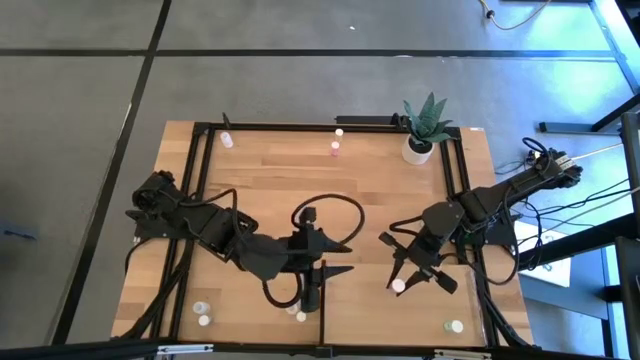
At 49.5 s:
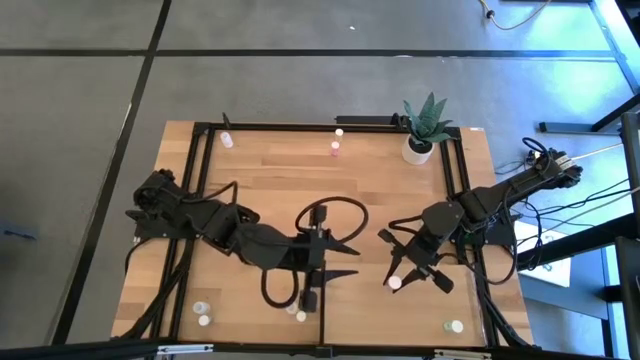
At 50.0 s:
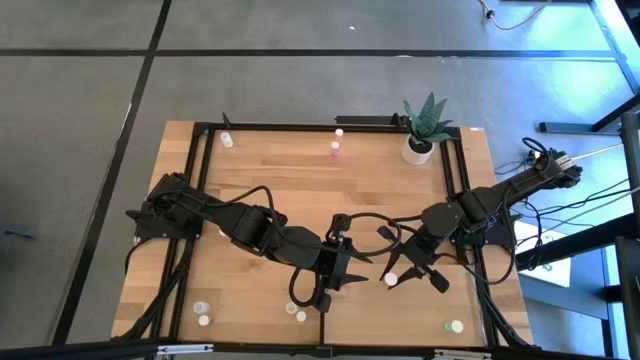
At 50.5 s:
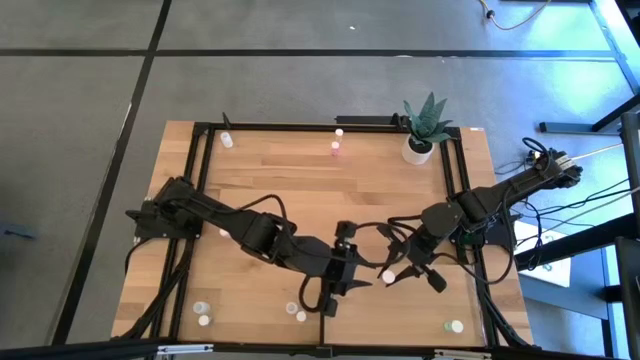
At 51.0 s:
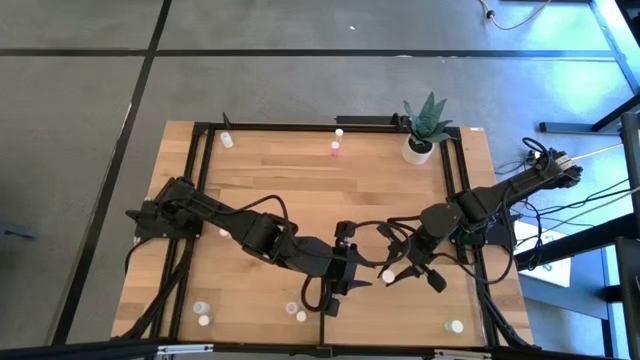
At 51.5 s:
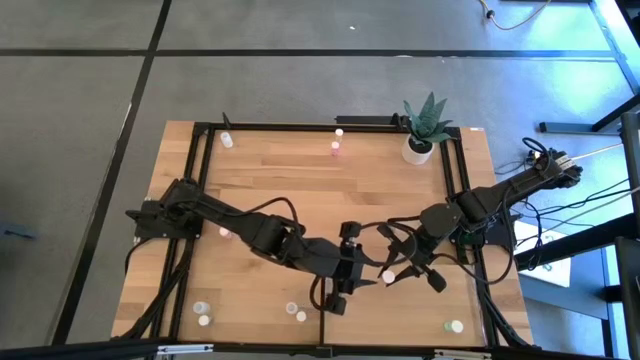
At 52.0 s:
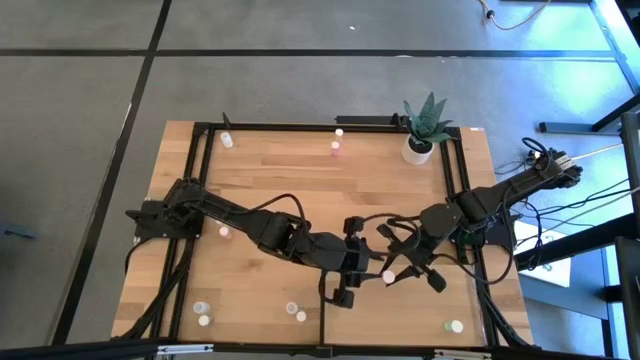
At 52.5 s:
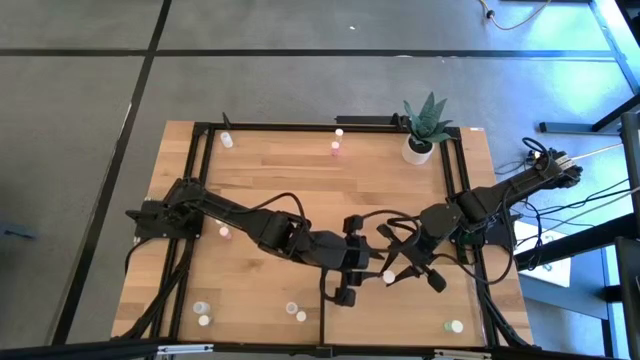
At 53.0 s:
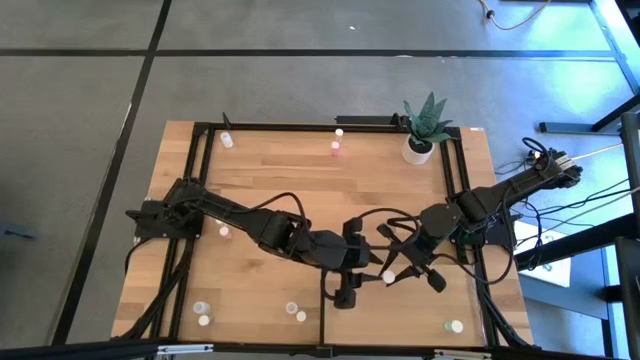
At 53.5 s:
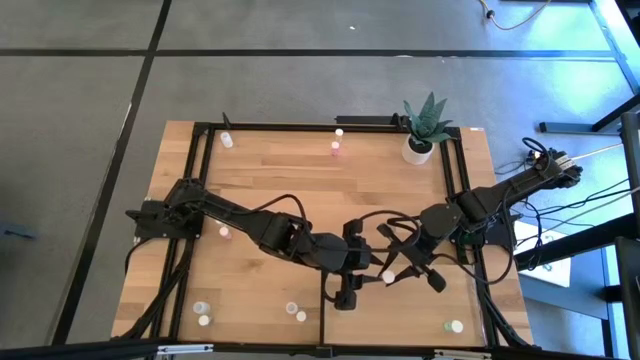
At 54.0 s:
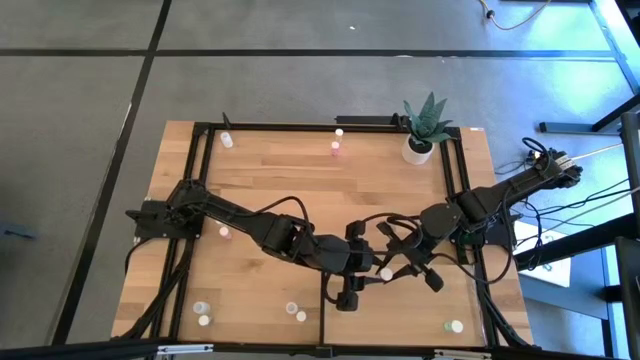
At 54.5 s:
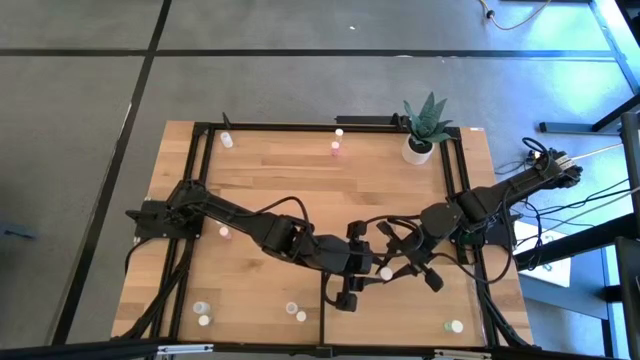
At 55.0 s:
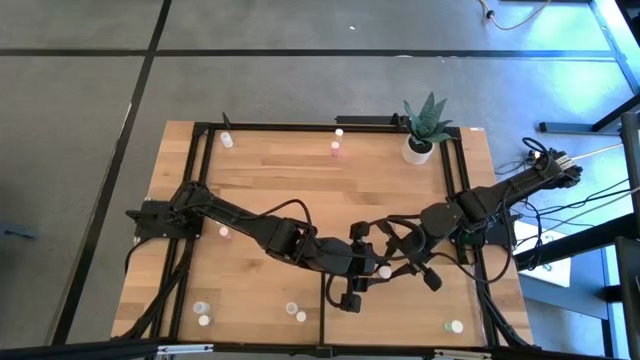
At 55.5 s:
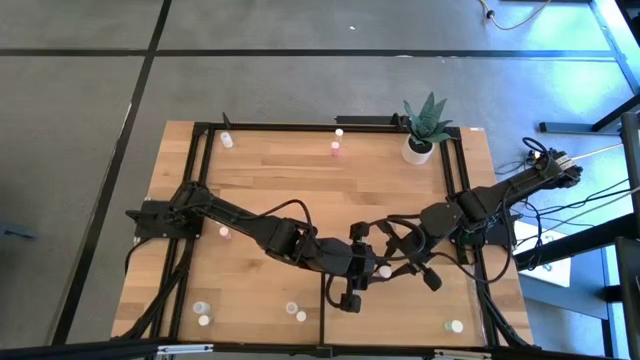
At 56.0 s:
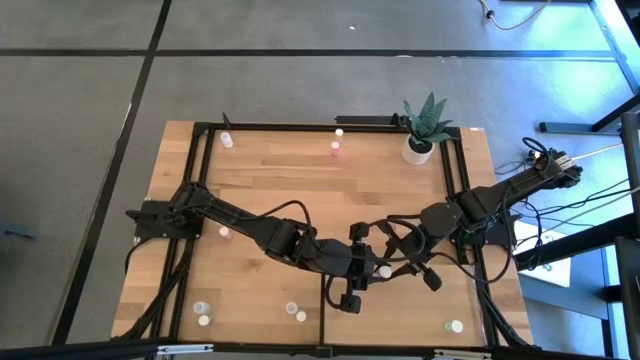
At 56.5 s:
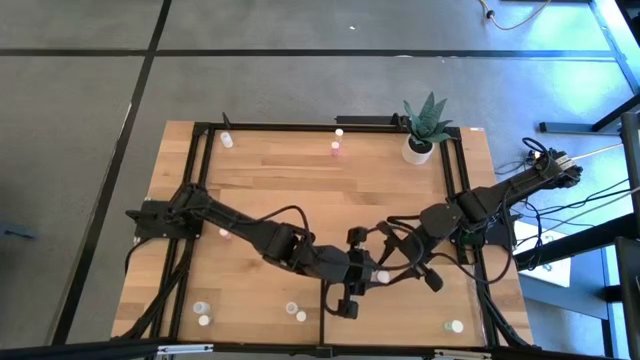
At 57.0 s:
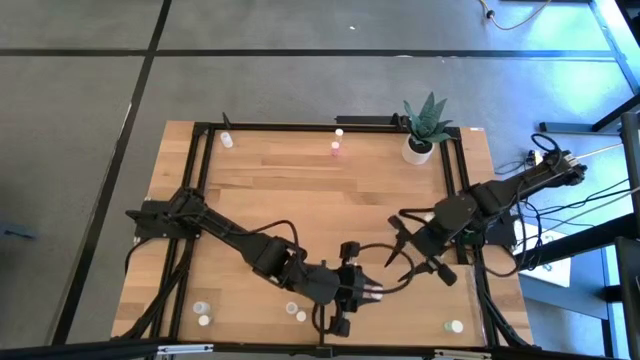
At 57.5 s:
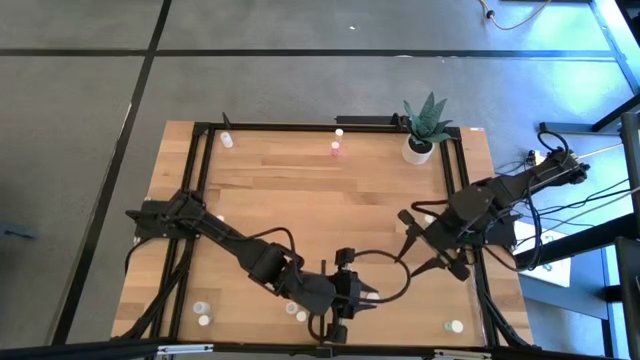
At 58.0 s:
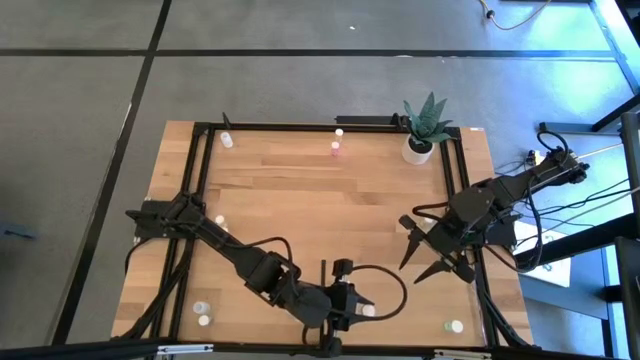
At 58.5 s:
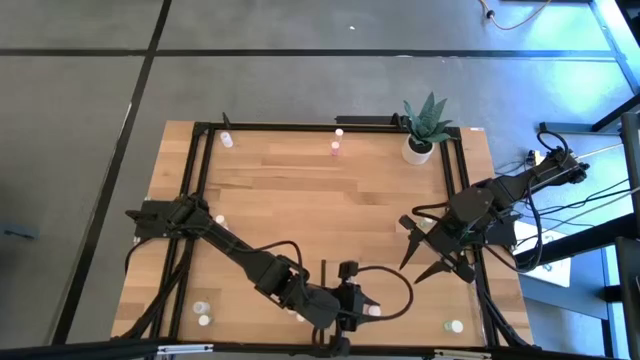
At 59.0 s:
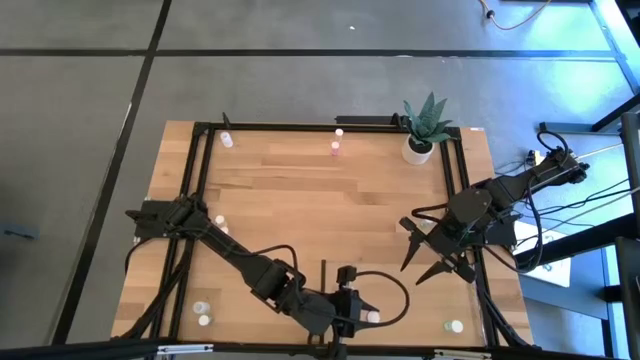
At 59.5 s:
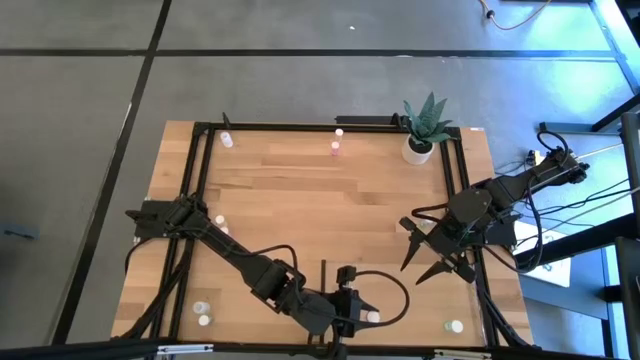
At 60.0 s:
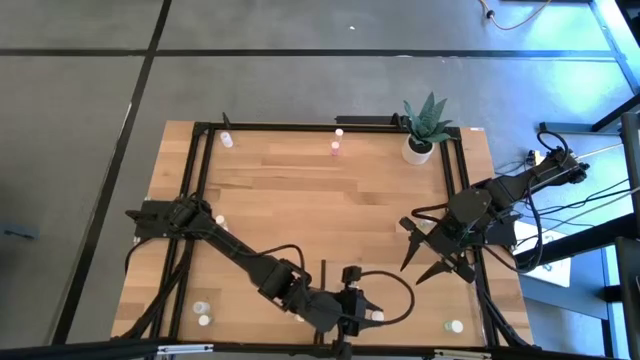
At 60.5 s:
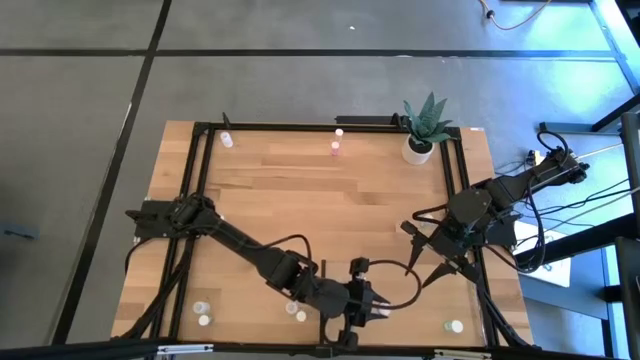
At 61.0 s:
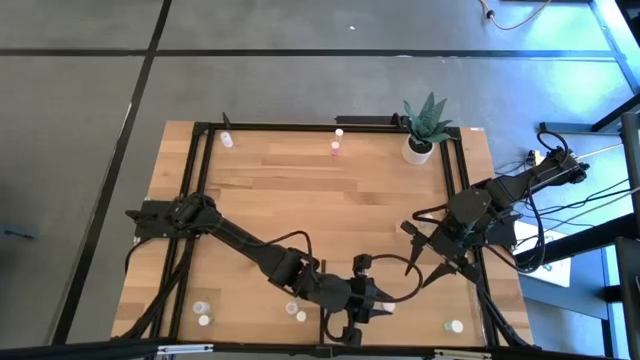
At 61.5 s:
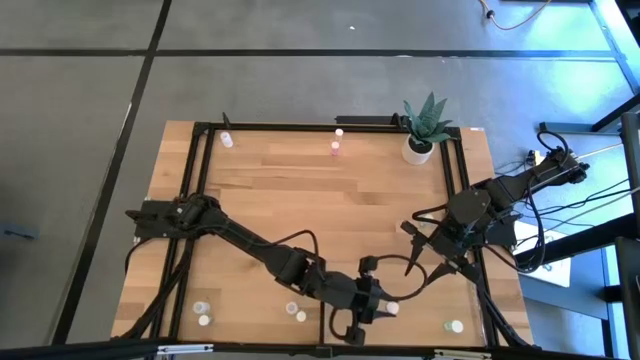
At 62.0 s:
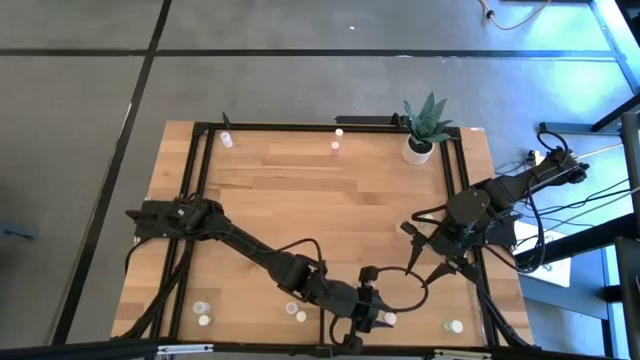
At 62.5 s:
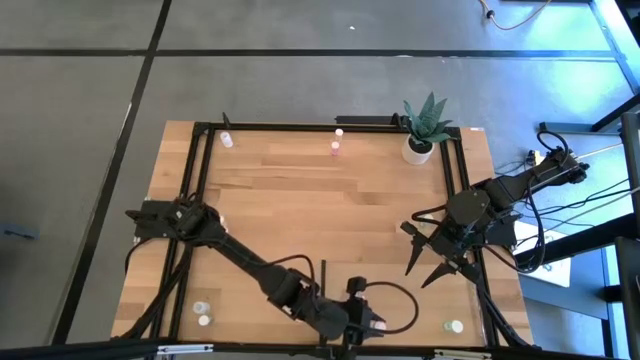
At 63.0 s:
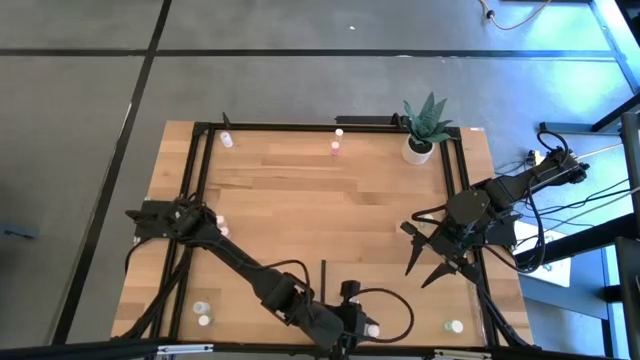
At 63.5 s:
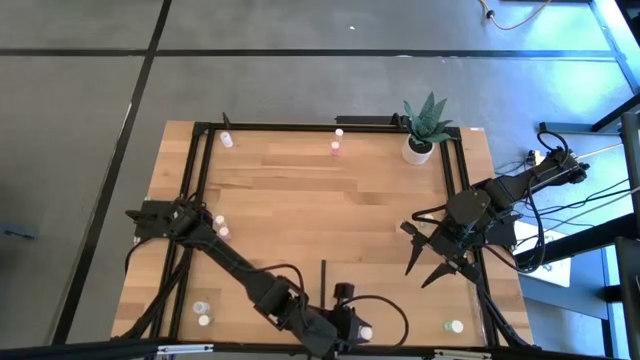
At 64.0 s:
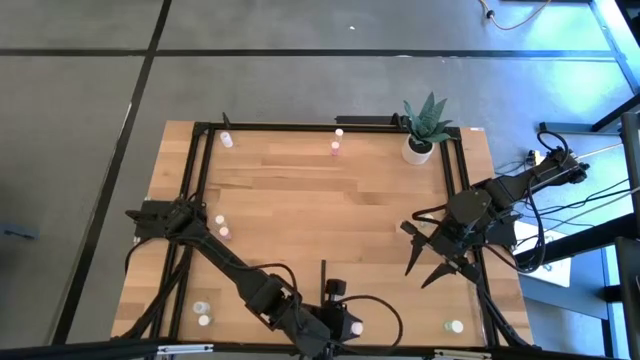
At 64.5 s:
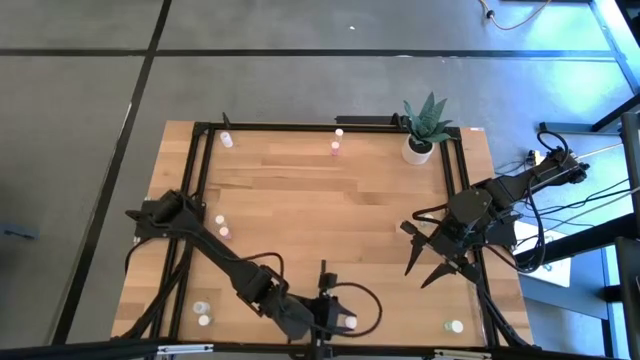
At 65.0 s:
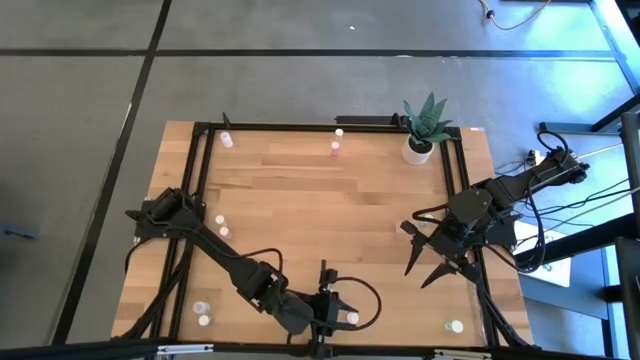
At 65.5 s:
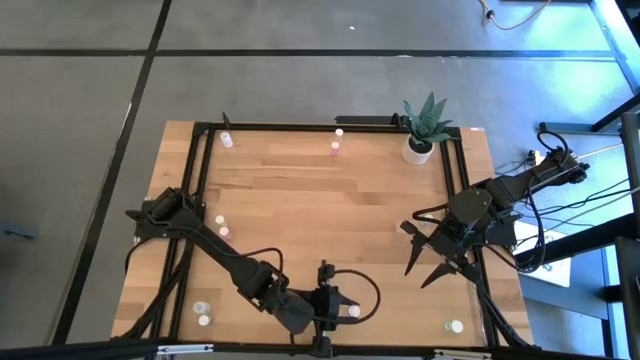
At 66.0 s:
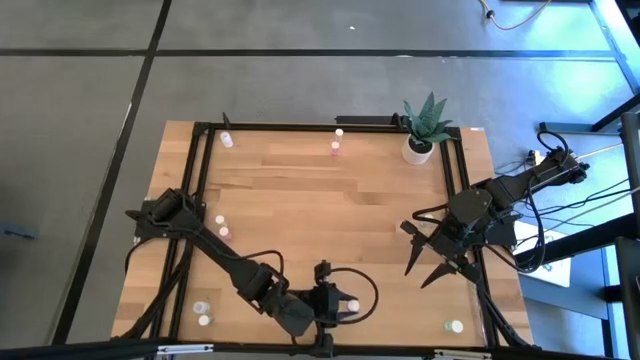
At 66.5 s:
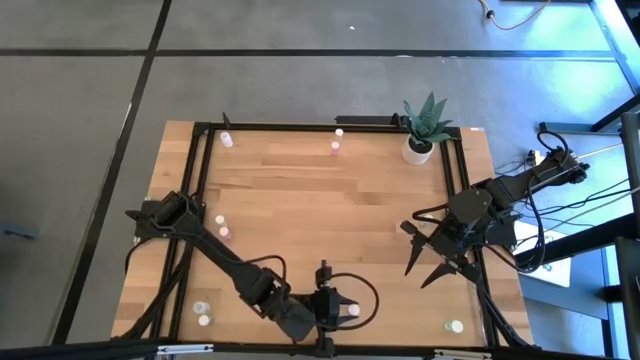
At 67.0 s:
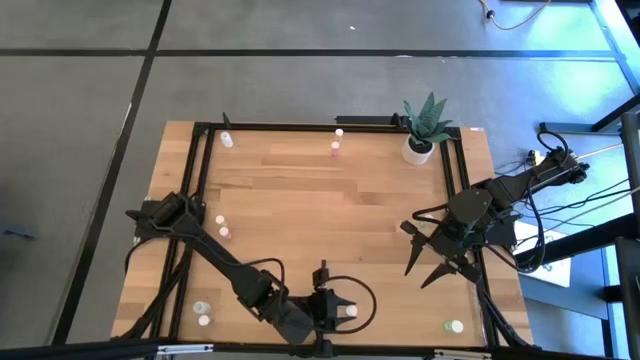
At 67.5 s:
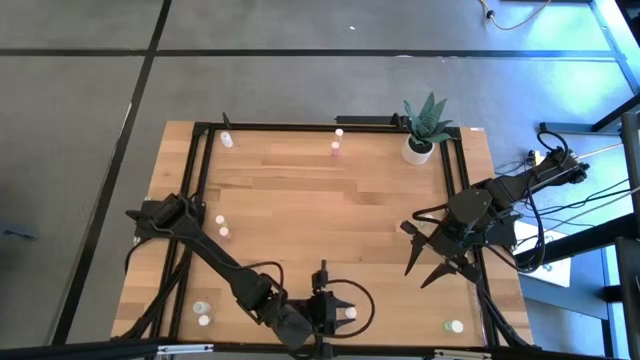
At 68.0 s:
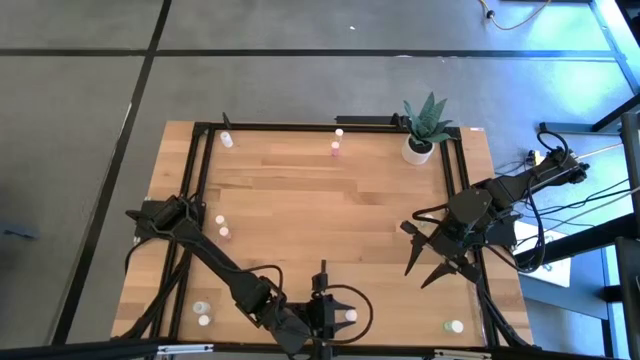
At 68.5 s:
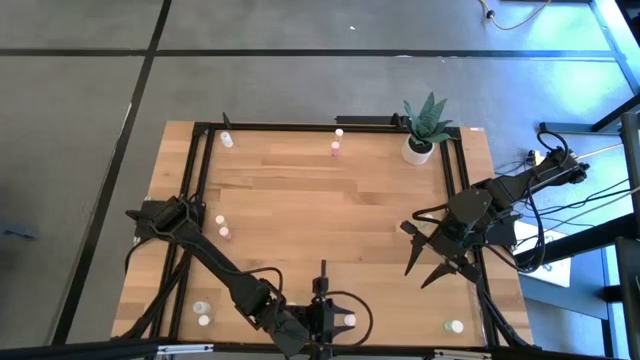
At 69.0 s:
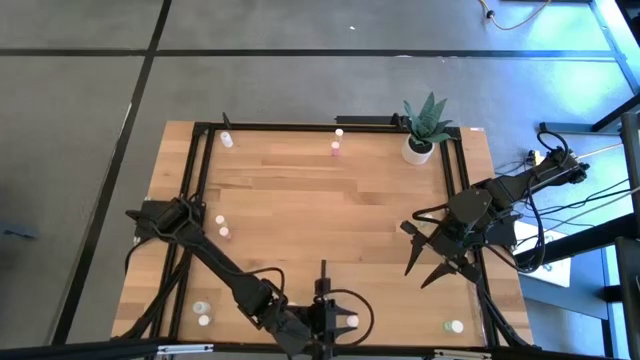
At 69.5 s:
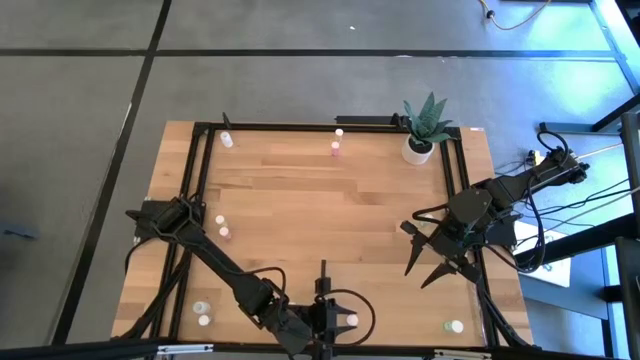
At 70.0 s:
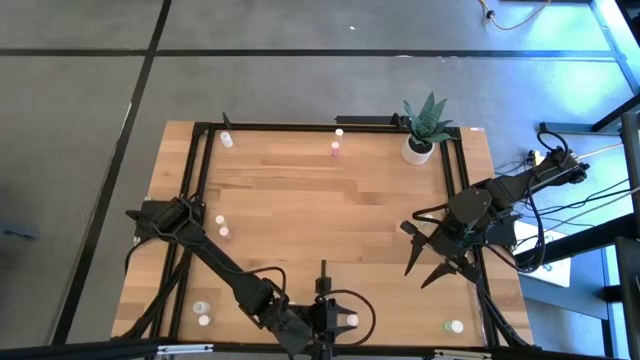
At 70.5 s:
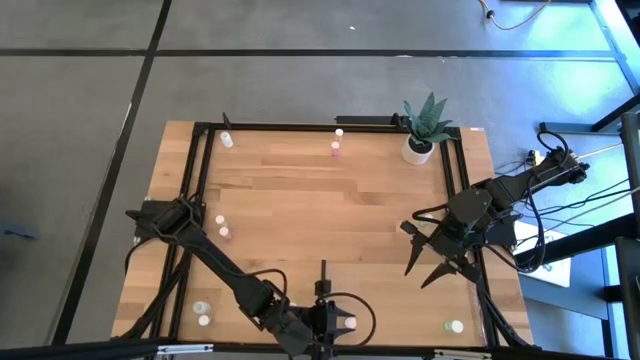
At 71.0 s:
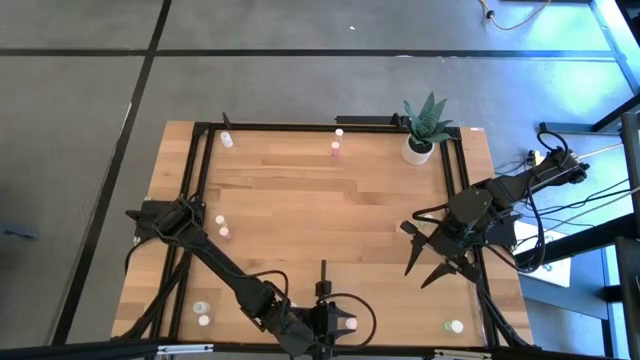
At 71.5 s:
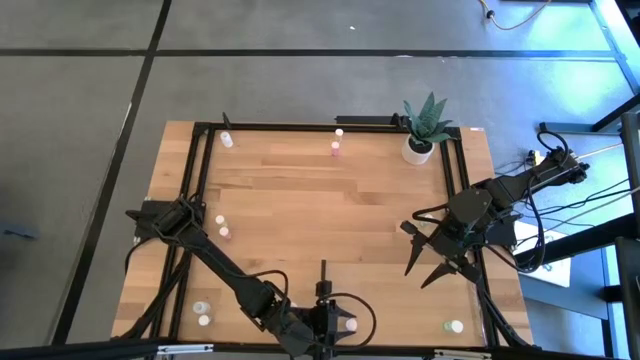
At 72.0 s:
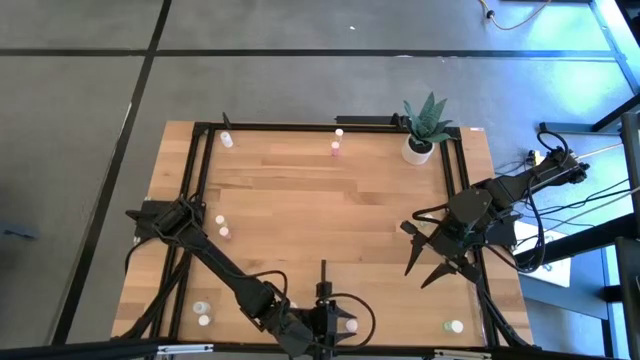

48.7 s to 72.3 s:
Task: Pick and place medicine bottles onto shelf by color
Put the bottom right pink pill bottle on the shelf
